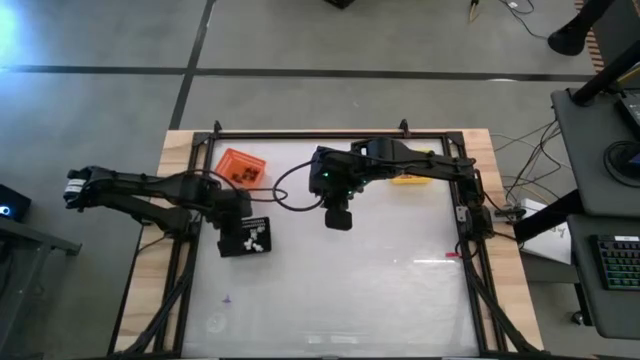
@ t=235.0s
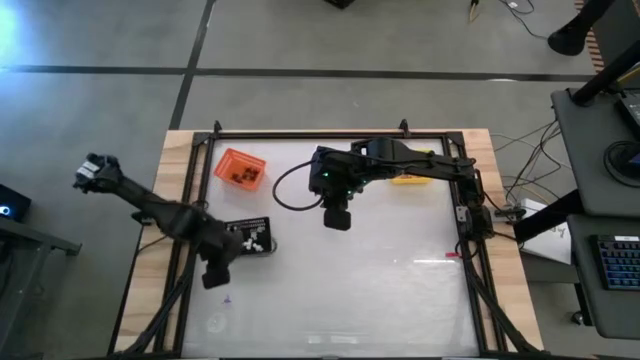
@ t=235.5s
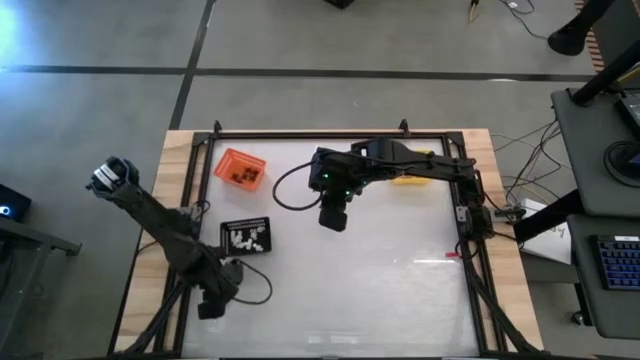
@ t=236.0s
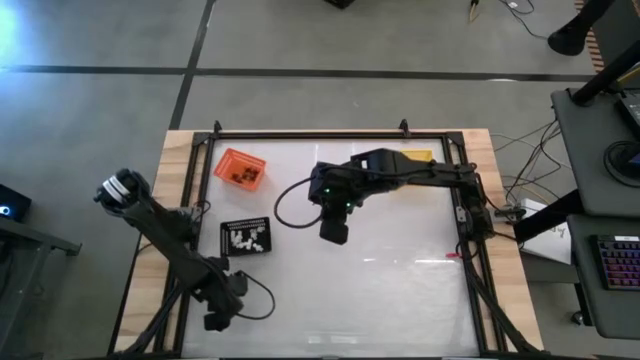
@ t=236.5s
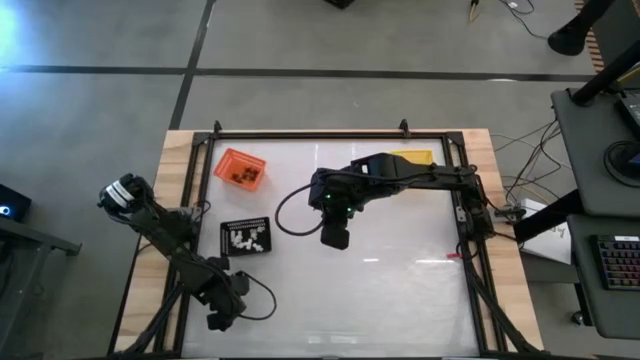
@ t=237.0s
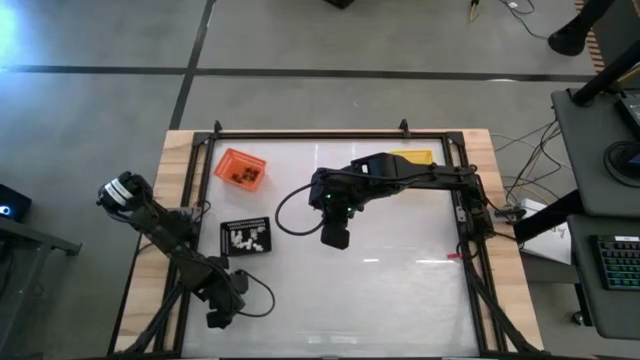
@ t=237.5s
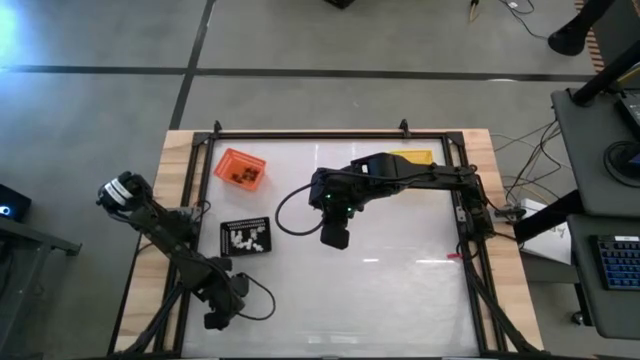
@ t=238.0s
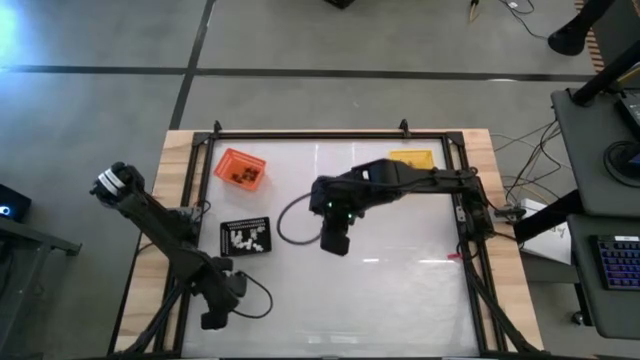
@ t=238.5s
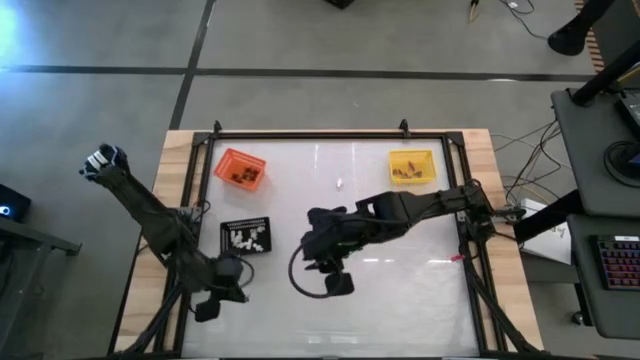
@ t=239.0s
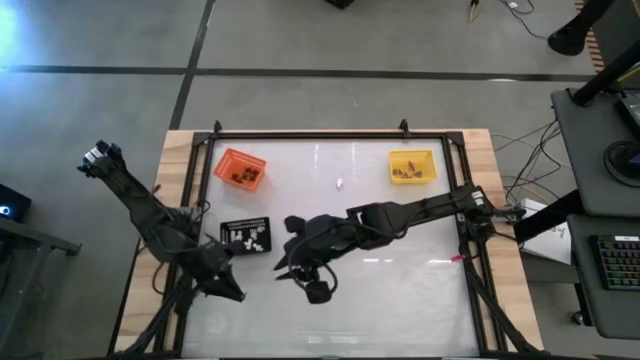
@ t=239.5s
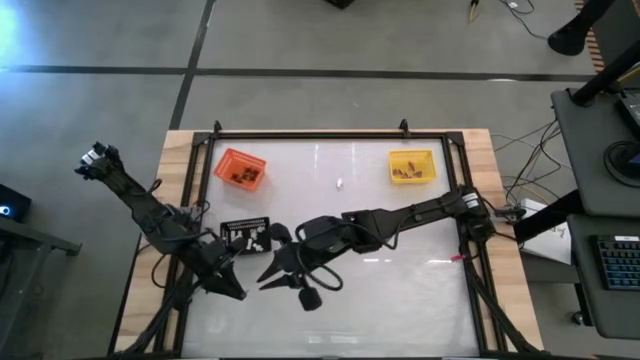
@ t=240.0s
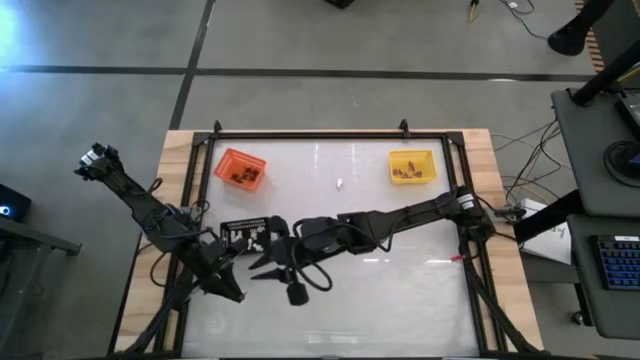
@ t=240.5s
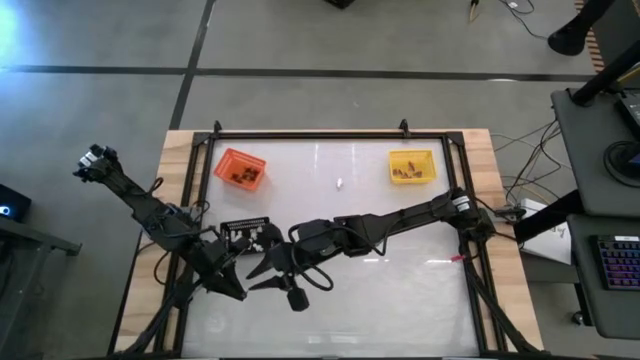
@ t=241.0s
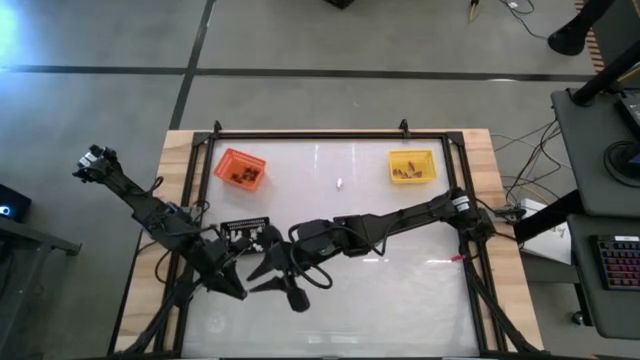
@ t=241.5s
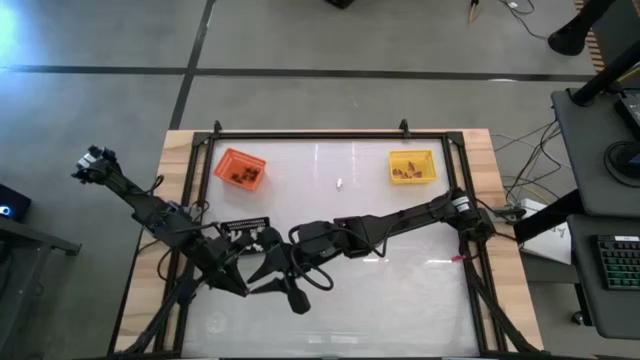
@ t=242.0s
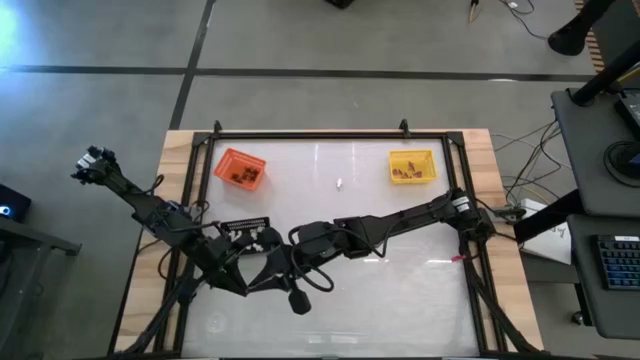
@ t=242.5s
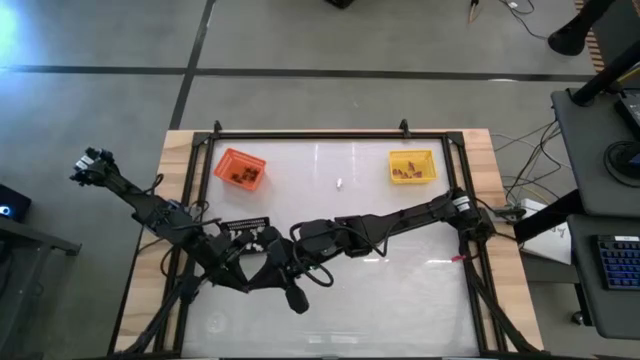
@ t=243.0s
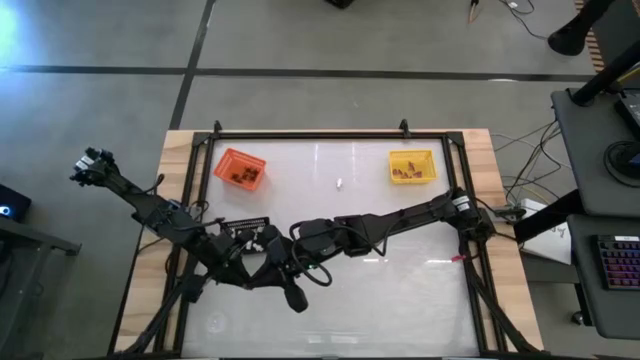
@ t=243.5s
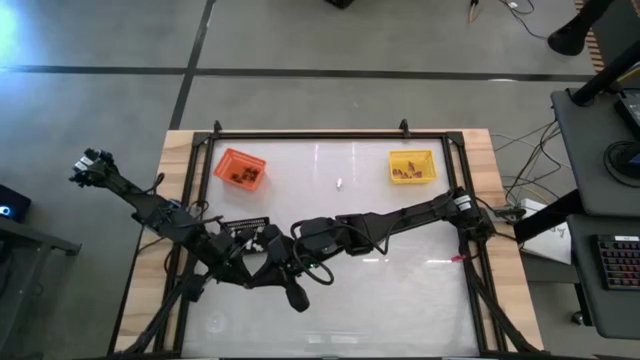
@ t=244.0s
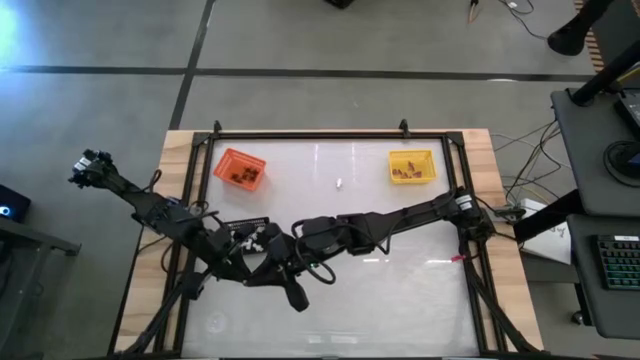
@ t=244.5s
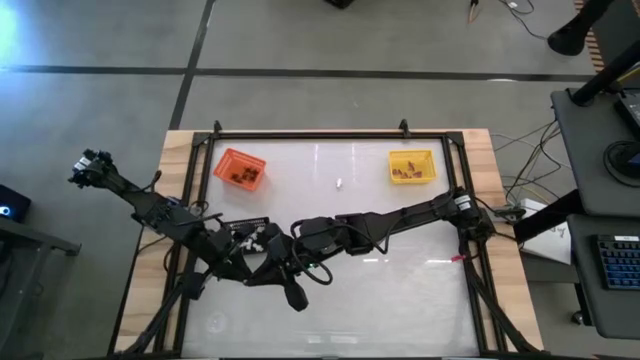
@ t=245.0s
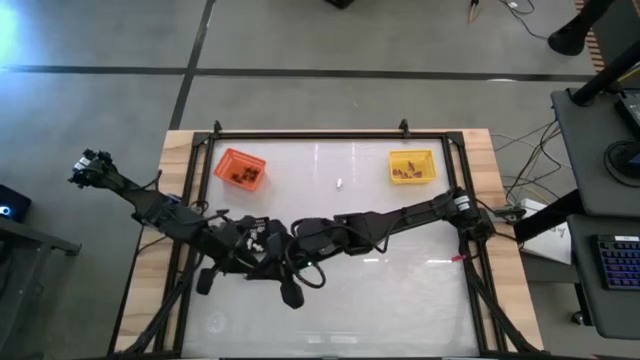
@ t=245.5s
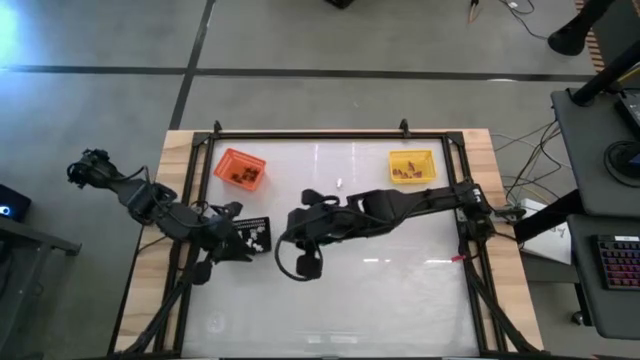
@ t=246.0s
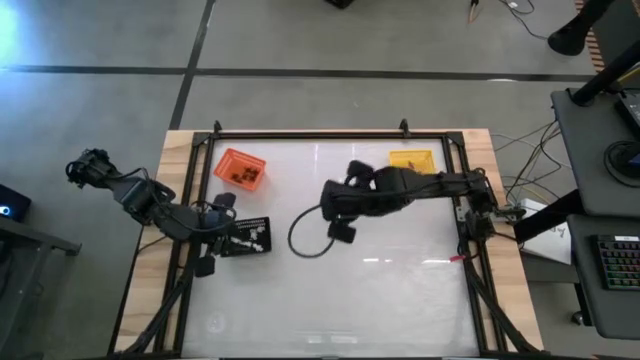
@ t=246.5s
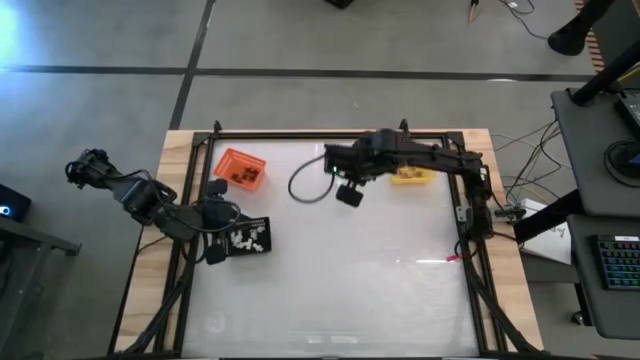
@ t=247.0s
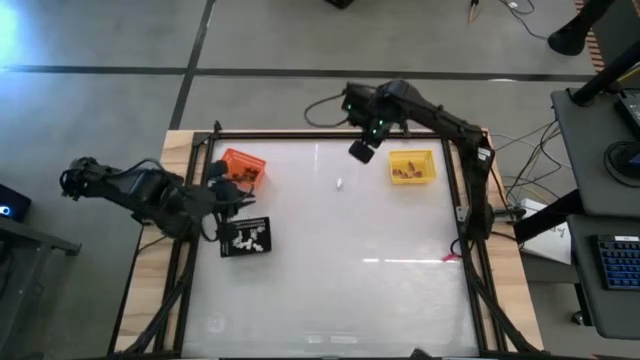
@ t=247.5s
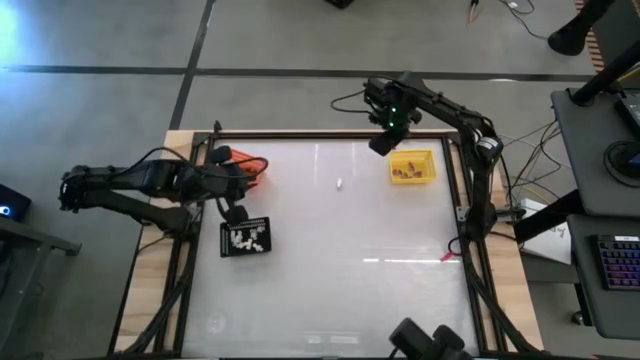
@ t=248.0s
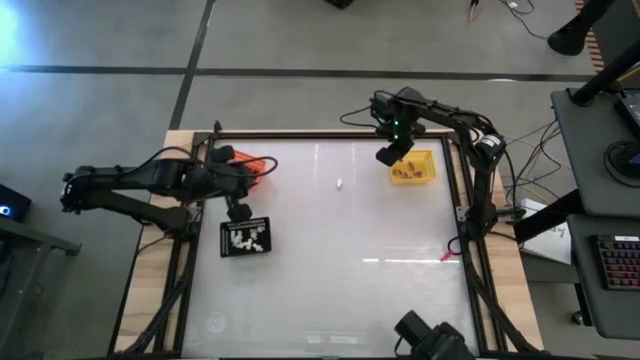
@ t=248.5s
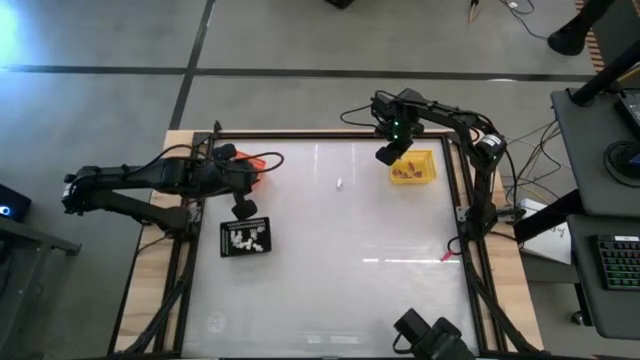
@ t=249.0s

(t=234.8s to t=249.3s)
Task: Sort Halloween decoration
Put the purple witch hat toy into the yellow bin

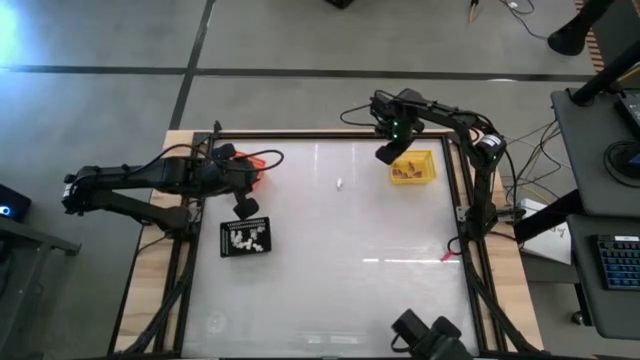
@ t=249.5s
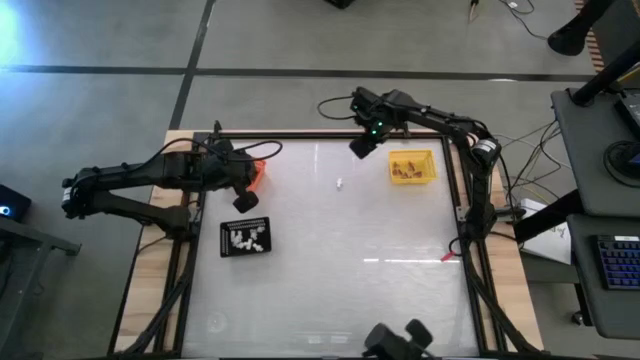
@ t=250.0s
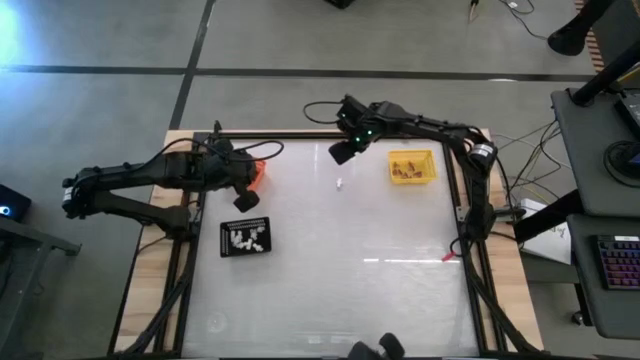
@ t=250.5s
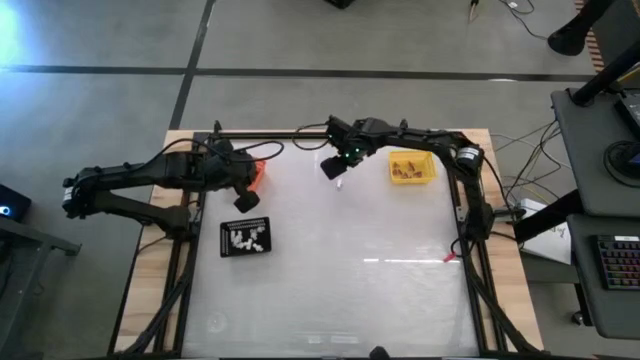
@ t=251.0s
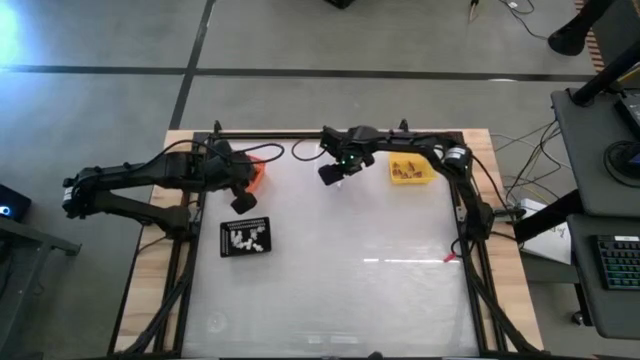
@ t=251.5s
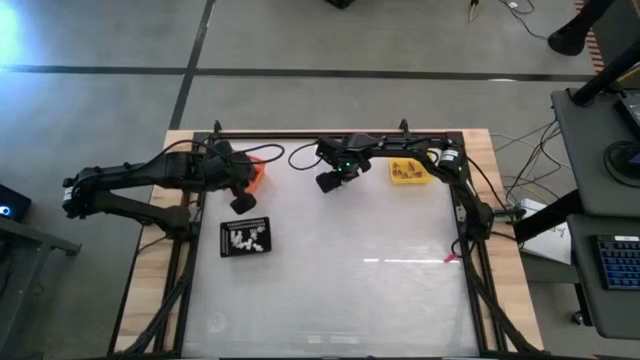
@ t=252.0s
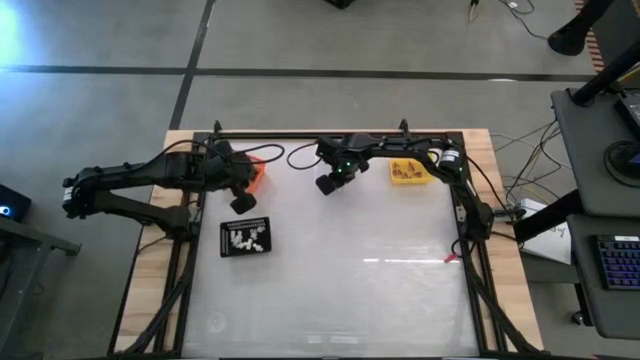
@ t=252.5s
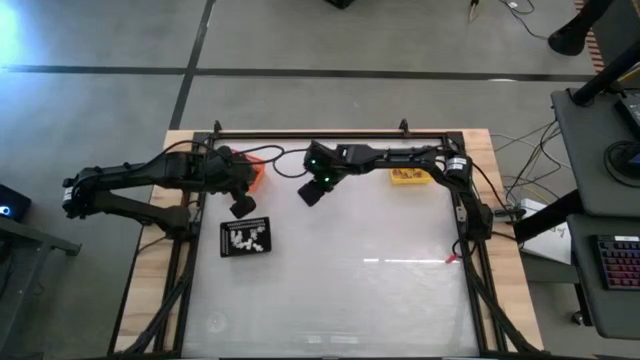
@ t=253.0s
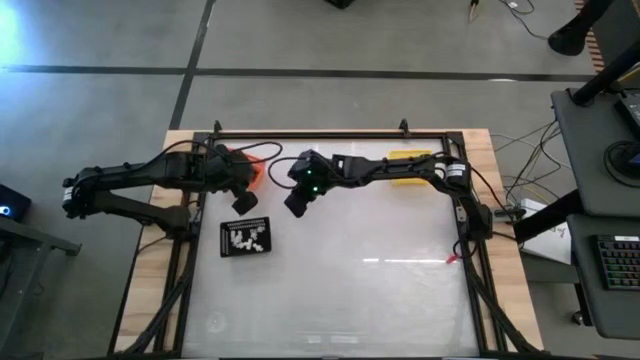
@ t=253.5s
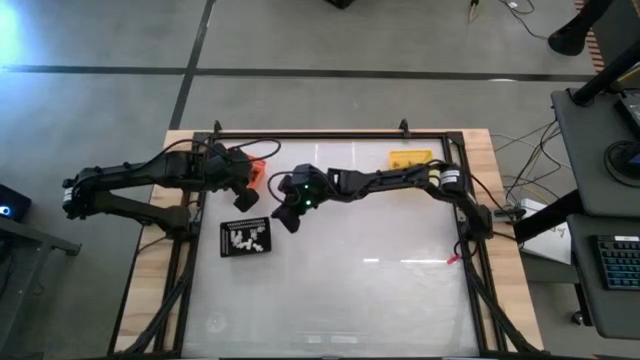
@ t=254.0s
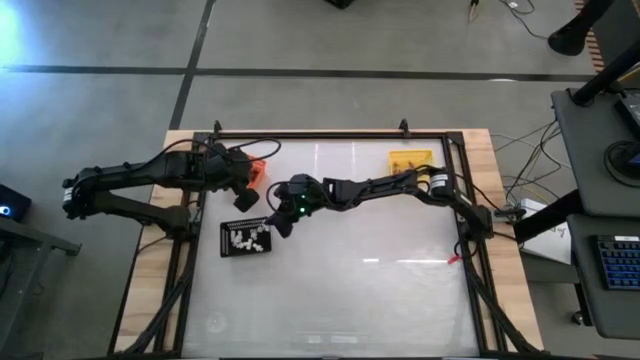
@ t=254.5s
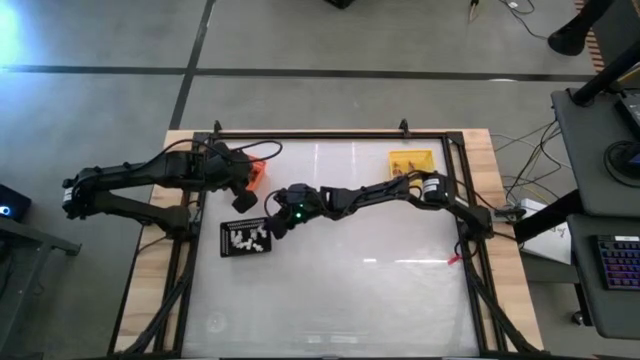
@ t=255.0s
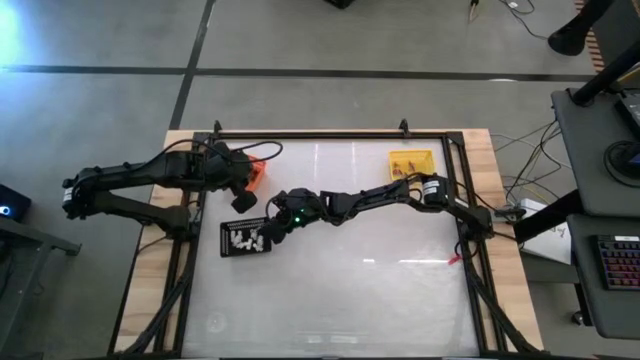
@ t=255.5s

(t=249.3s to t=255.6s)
Put the white skeleton toy into the black bin
